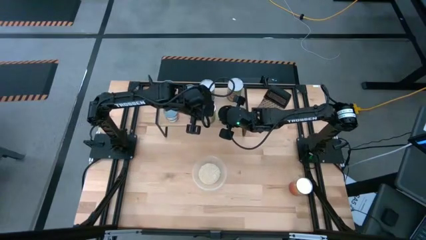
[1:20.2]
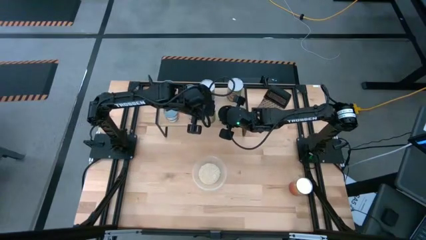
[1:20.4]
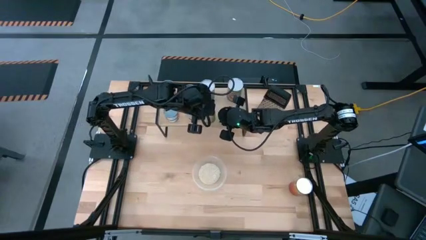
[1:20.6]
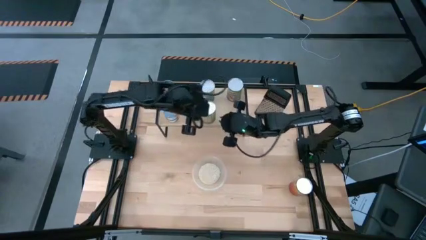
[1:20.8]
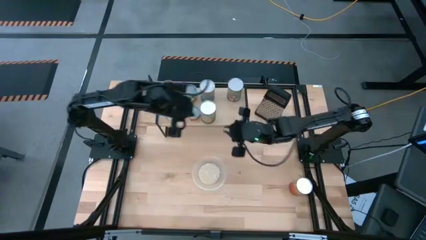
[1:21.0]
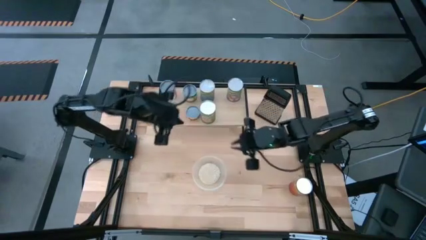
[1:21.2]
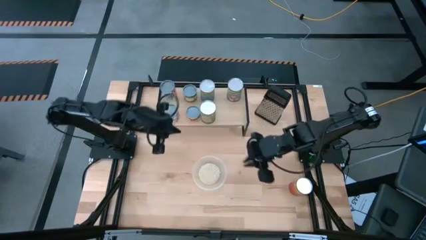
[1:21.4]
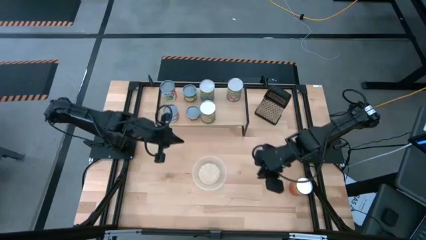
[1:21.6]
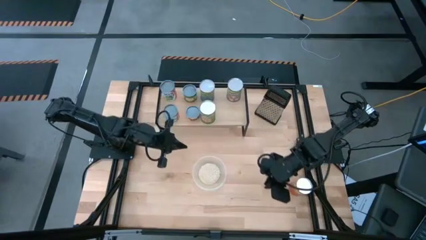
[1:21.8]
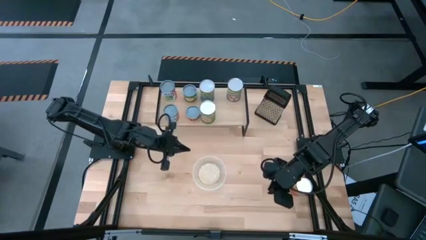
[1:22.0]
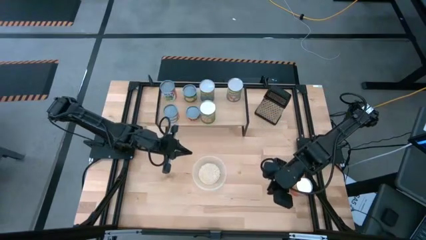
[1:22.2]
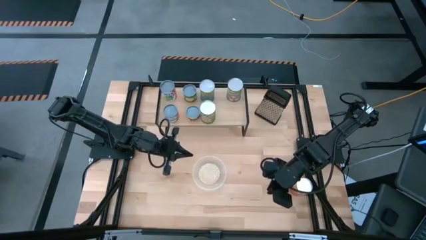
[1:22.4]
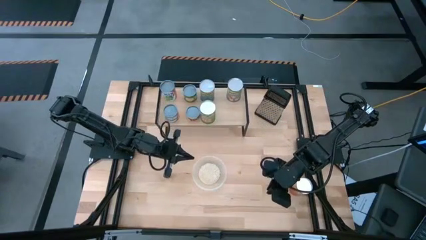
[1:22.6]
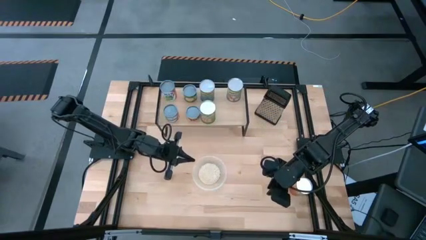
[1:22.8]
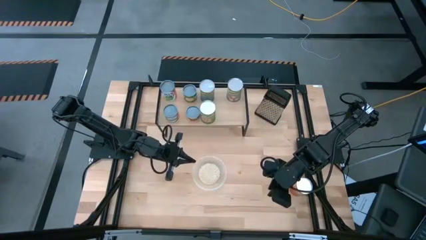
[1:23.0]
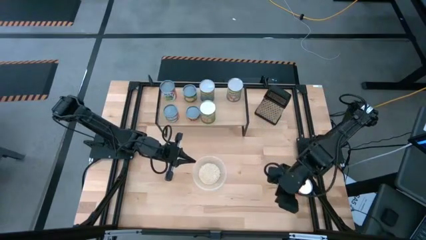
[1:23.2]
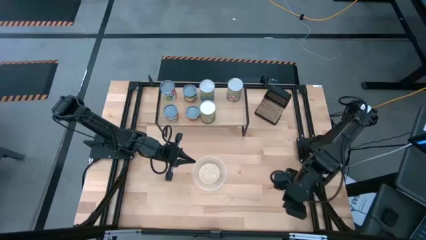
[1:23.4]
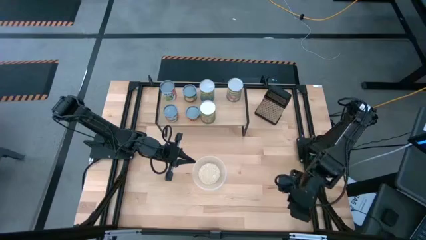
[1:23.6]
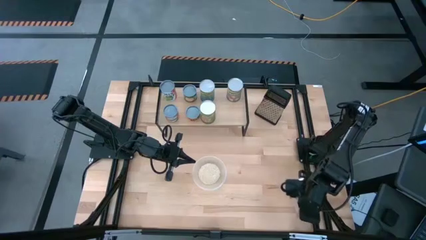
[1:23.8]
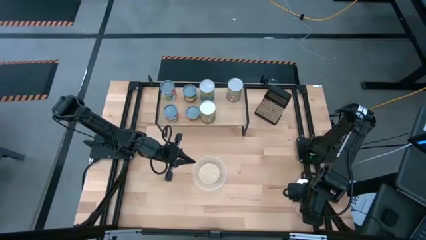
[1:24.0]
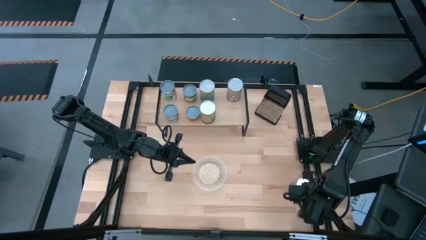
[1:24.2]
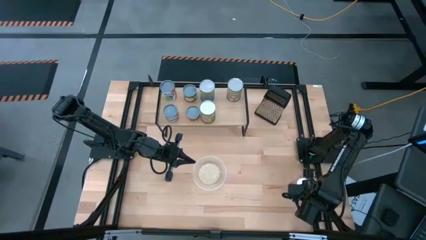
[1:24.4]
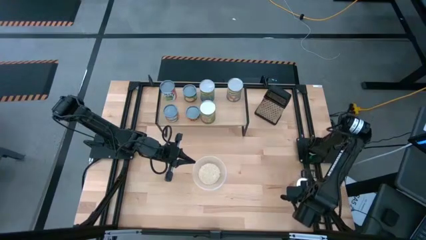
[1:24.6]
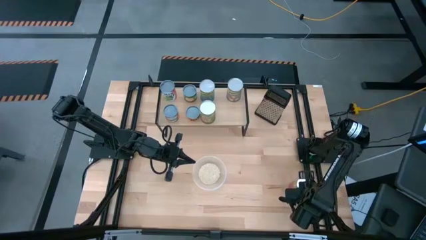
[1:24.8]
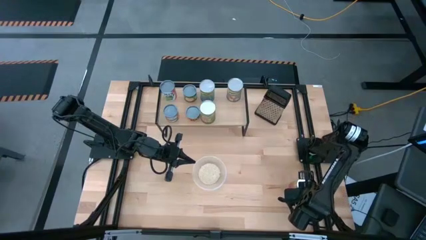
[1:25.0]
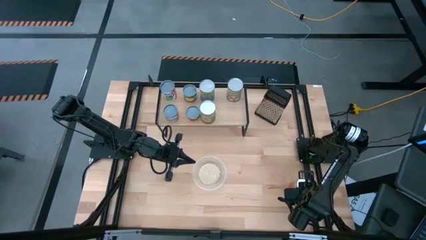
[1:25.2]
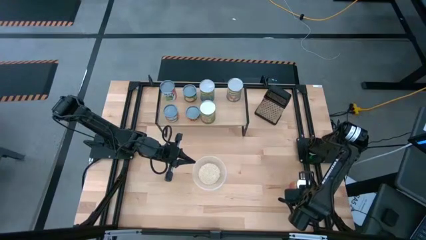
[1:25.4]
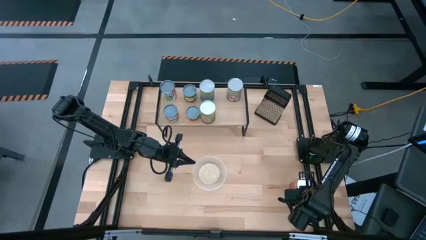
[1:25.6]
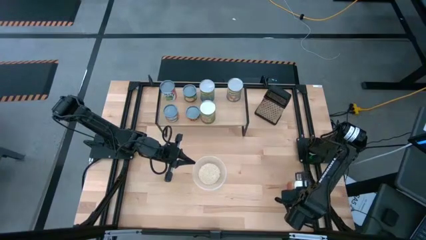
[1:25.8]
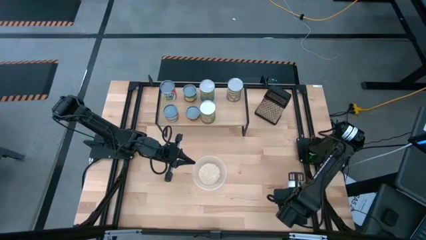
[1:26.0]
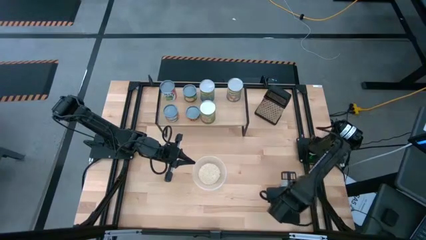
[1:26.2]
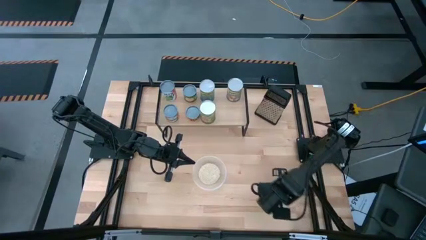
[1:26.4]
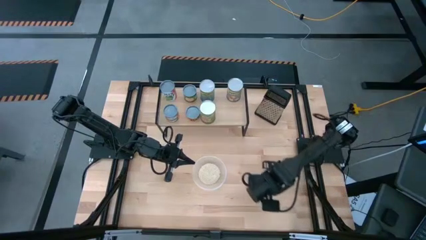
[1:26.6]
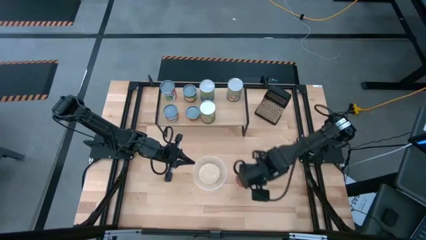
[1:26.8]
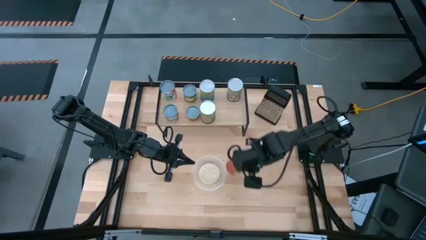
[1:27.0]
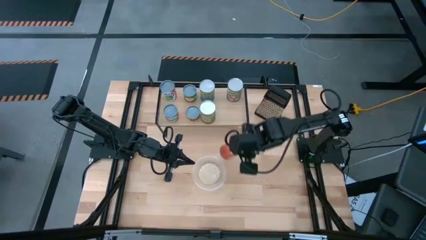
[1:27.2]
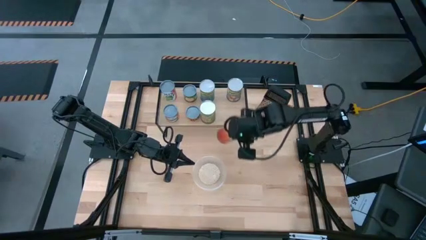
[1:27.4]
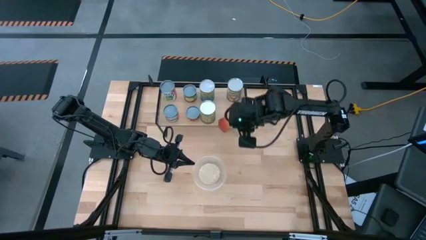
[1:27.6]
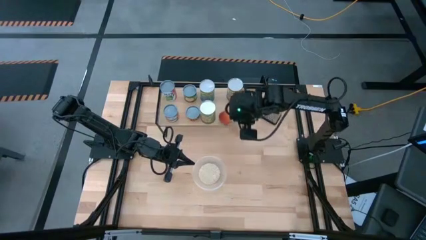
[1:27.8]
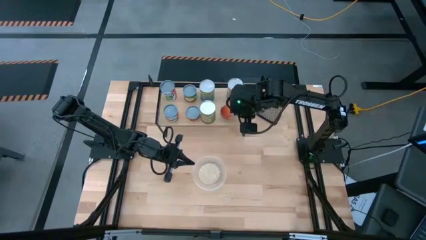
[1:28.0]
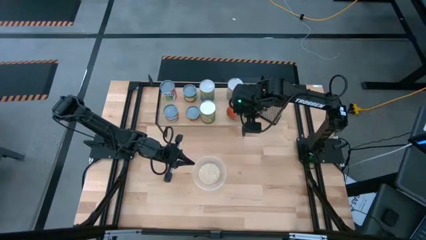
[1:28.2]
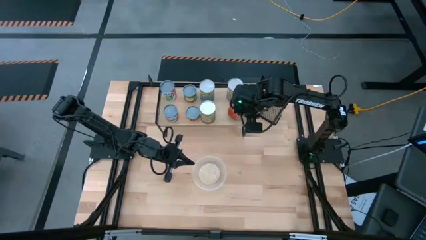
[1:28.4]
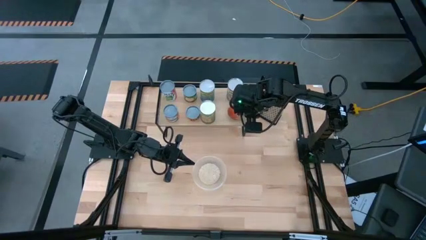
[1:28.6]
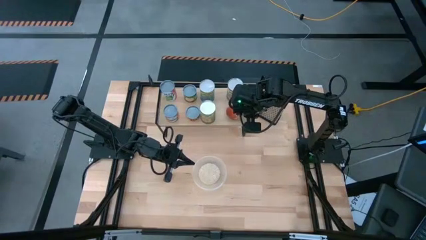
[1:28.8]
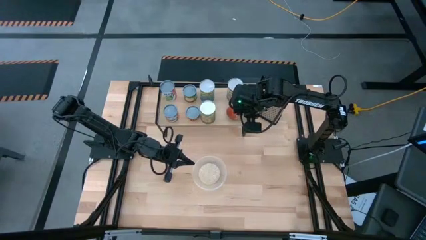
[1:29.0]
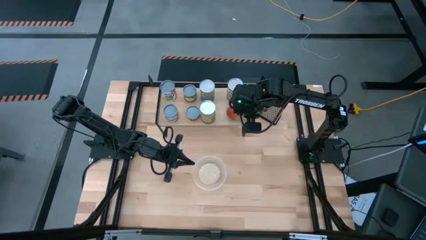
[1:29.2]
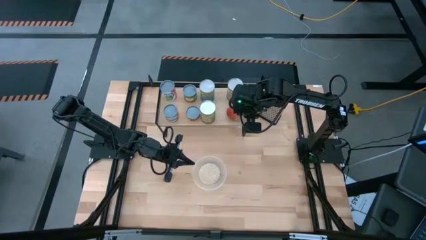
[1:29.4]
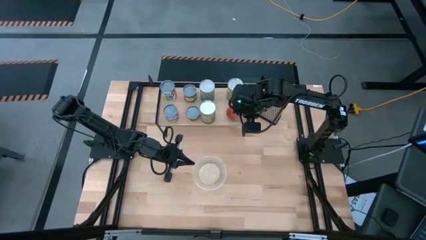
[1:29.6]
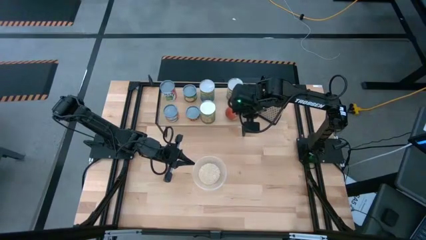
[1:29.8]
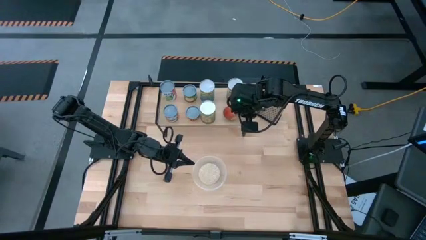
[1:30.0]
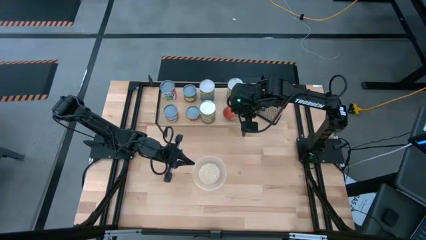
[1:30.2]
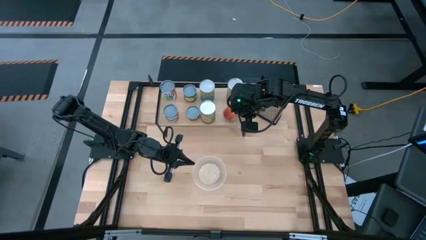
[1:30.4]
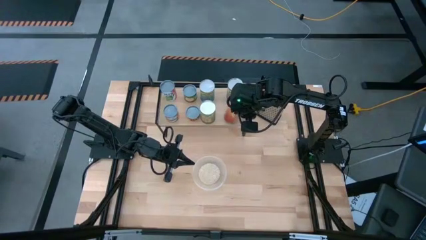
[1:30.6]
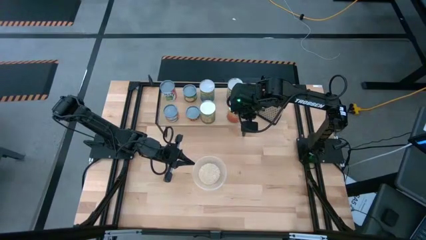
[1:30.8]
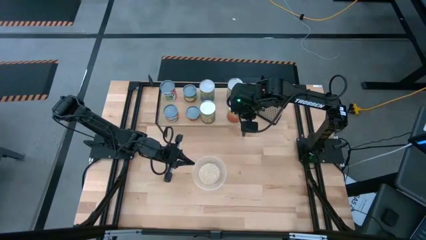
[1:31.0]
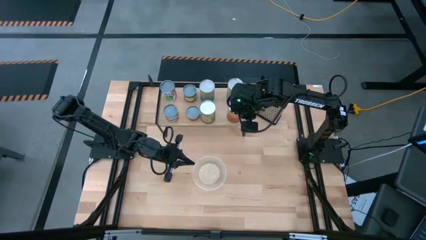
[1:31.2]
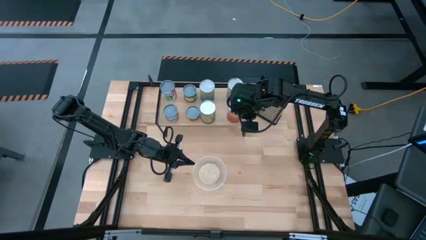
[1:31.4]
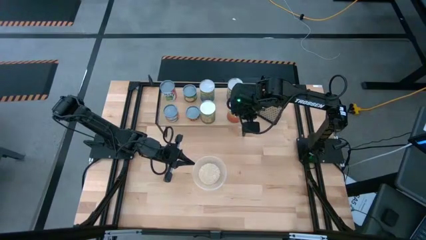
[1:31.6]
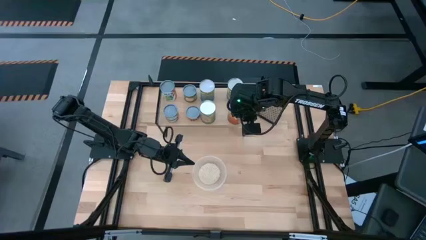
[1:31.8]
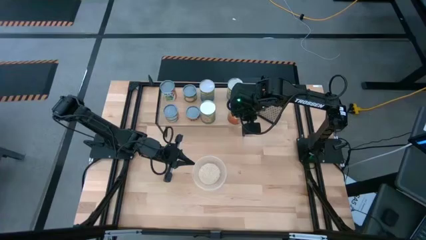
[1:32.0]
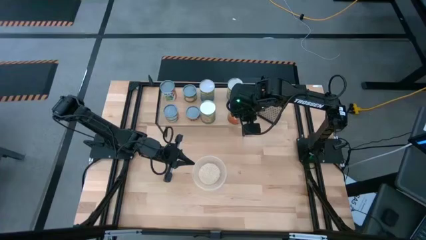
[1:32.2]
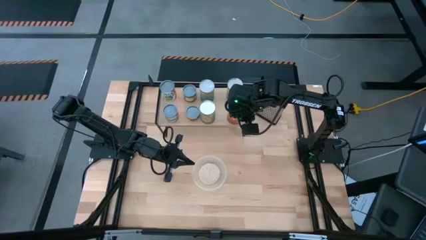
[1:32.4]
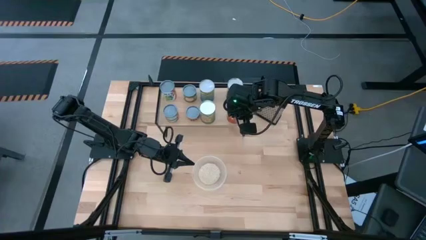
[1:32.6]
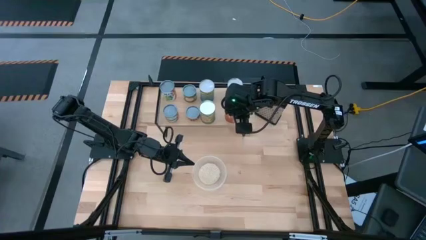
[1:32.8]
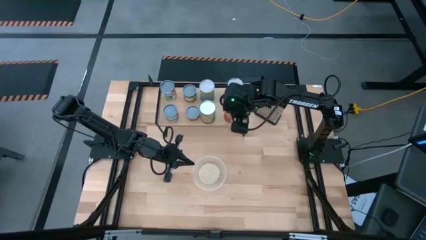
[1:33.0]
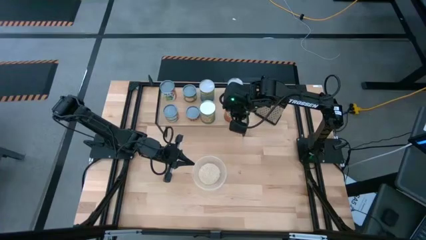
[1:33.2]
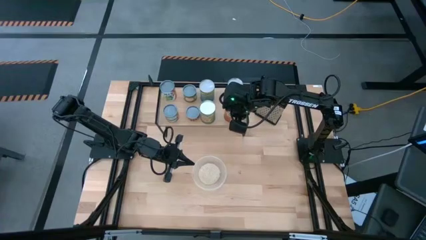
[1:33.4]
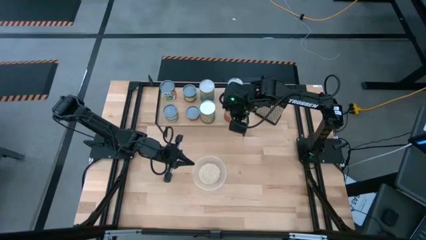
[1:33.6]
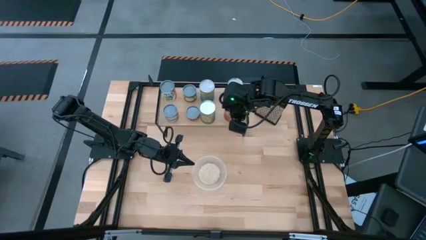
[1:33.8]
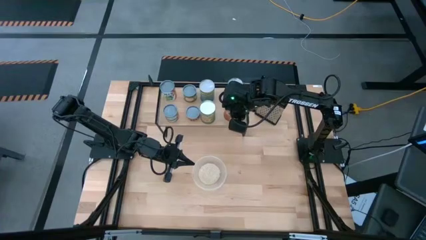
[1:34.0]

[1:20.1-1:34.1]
Task: Pick and place cans onto a shelf
Put the big canned pineapple on the shelf
